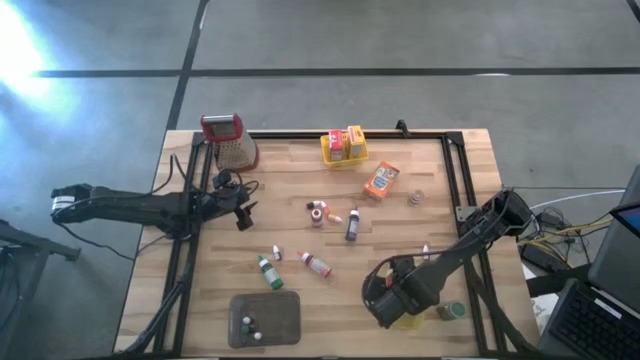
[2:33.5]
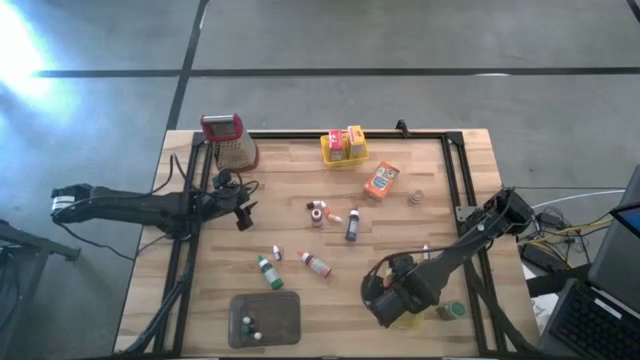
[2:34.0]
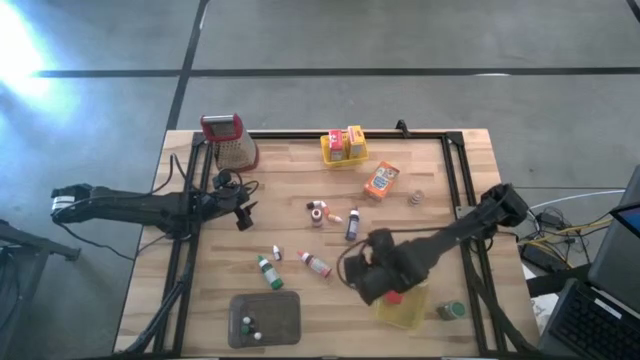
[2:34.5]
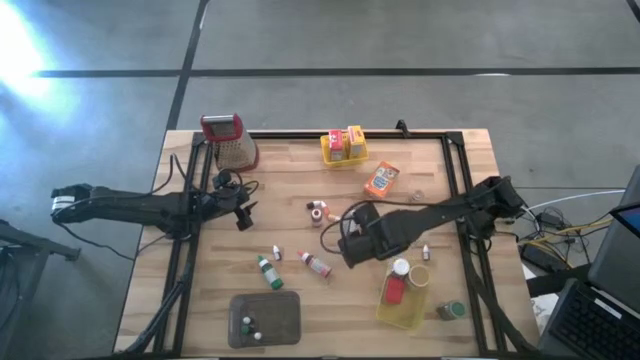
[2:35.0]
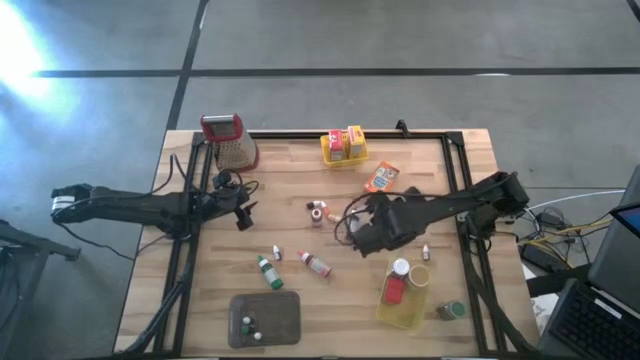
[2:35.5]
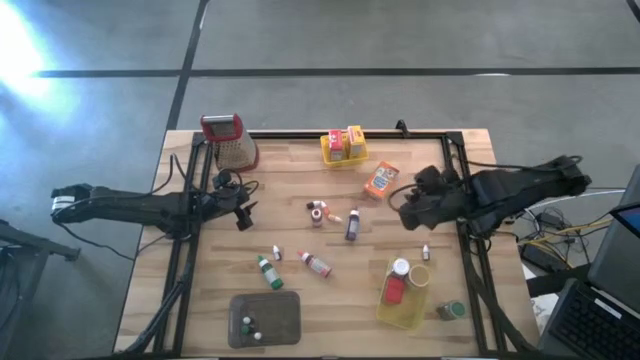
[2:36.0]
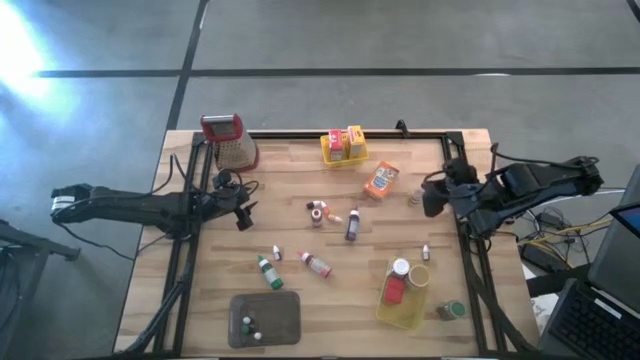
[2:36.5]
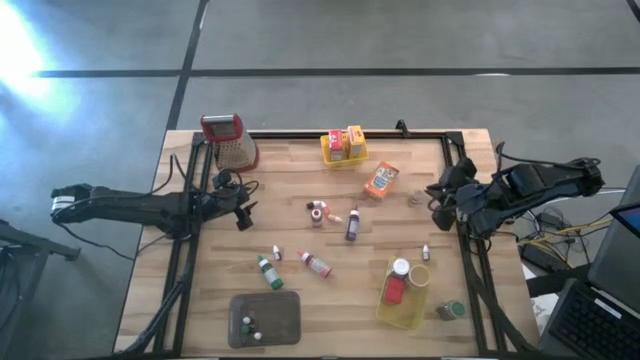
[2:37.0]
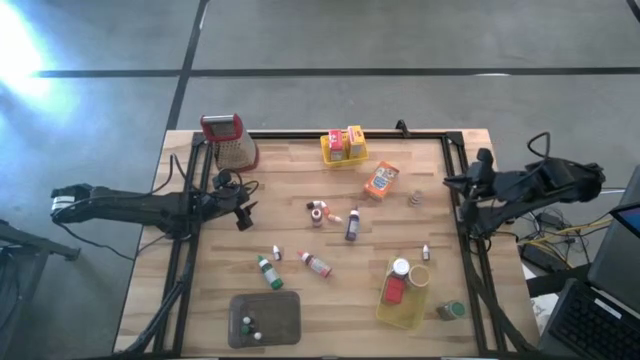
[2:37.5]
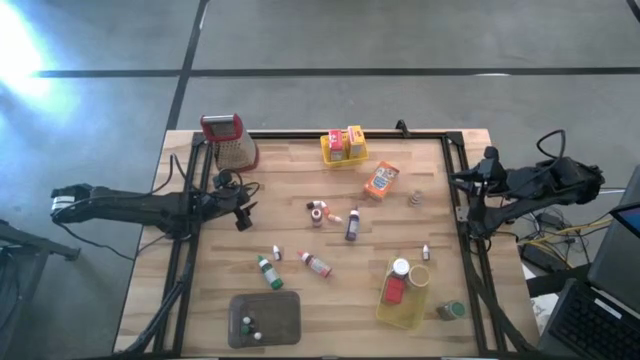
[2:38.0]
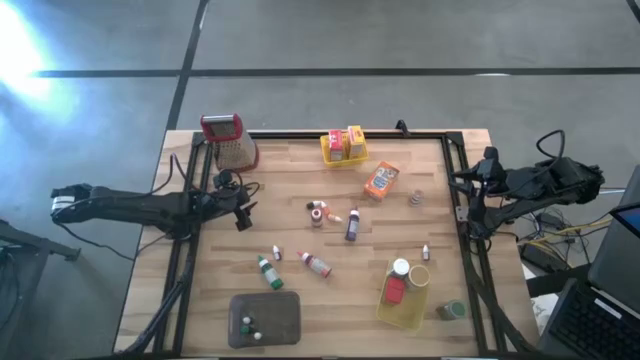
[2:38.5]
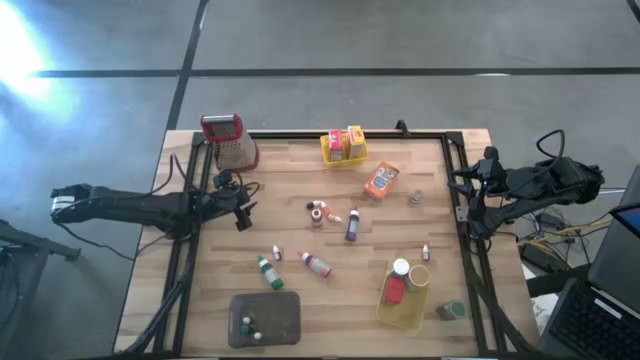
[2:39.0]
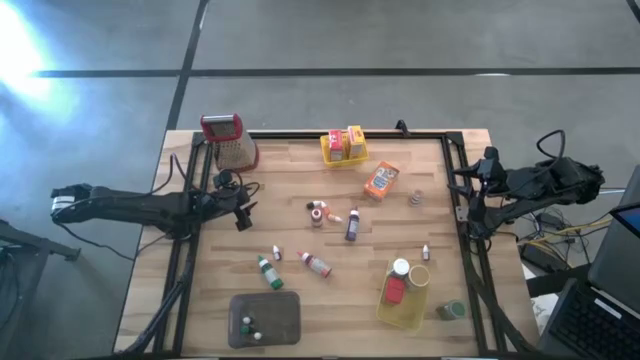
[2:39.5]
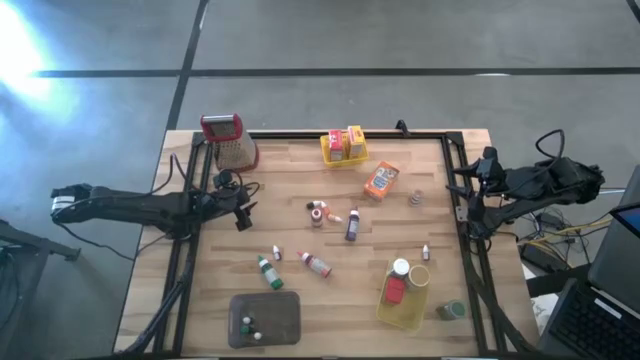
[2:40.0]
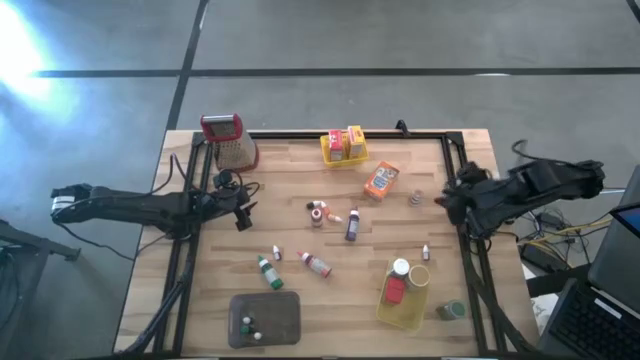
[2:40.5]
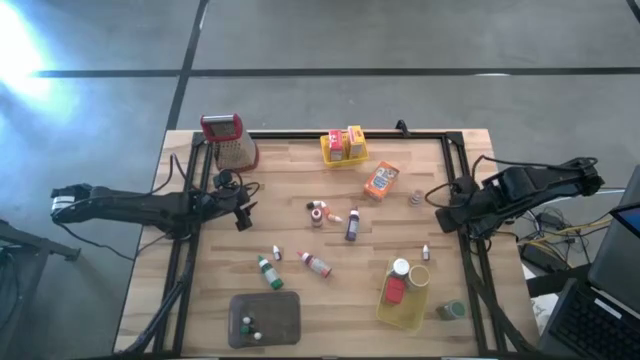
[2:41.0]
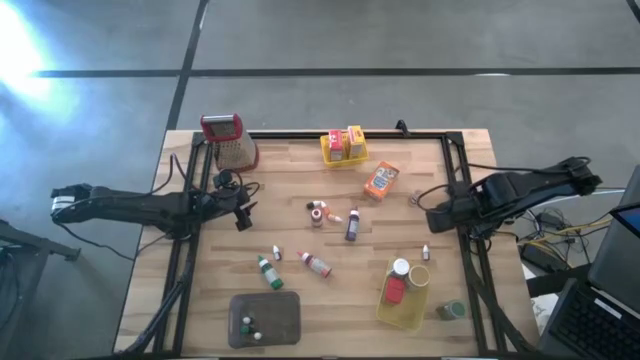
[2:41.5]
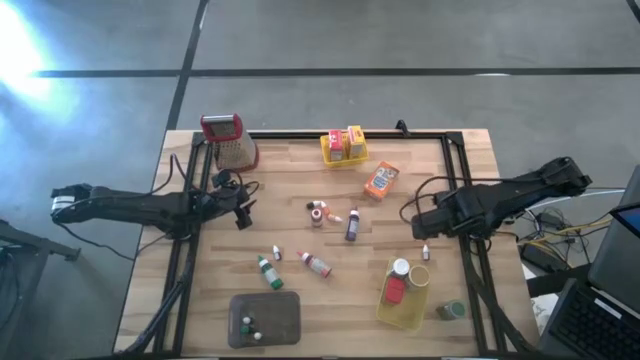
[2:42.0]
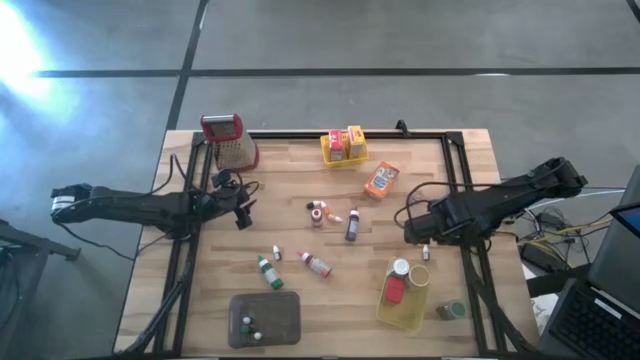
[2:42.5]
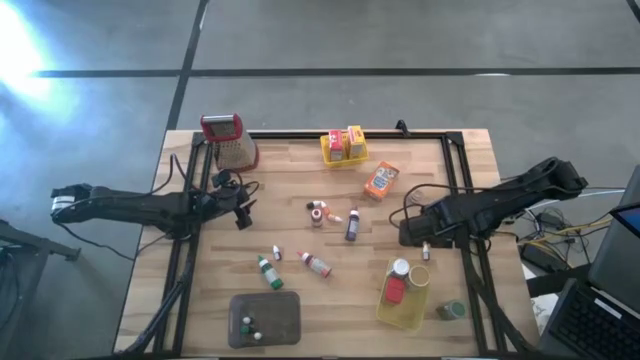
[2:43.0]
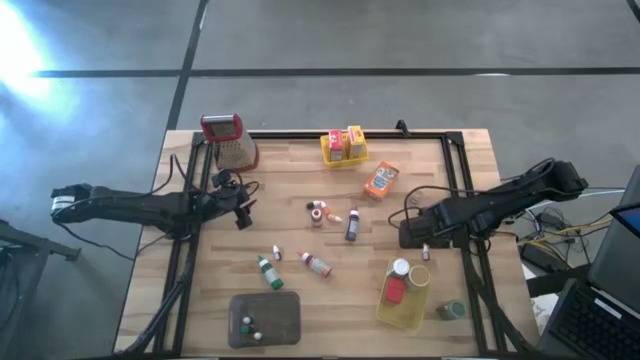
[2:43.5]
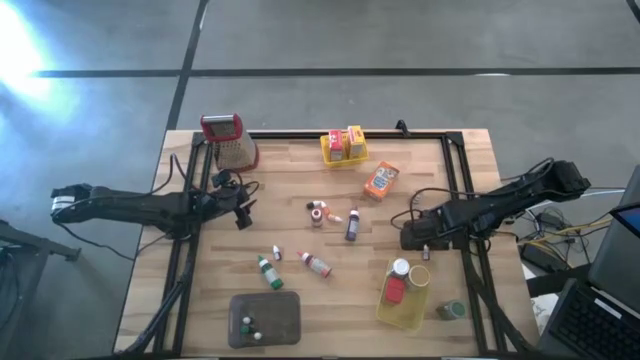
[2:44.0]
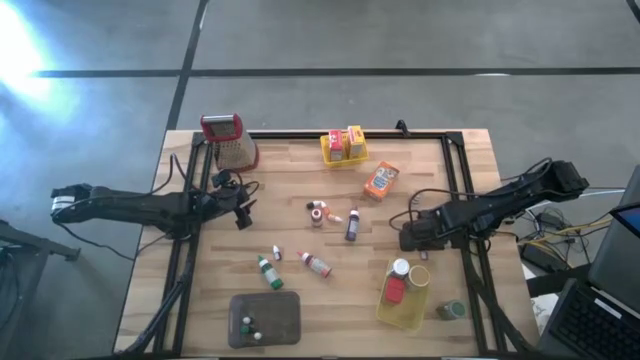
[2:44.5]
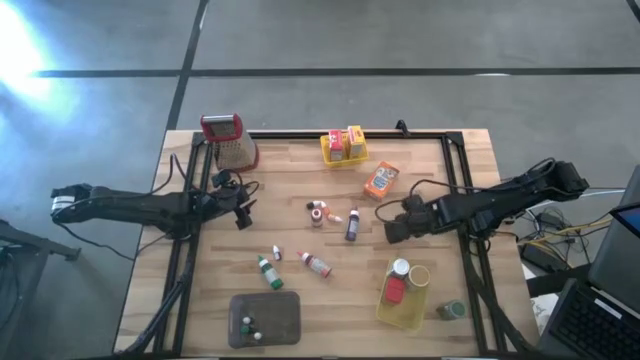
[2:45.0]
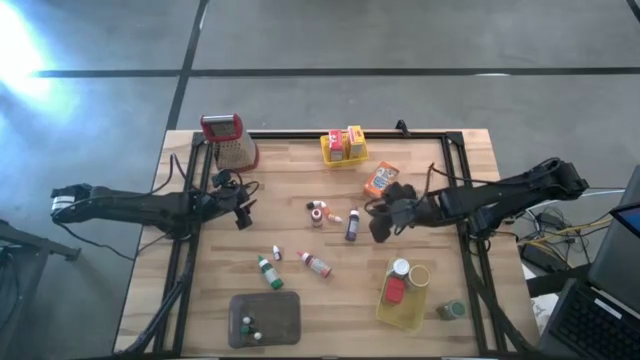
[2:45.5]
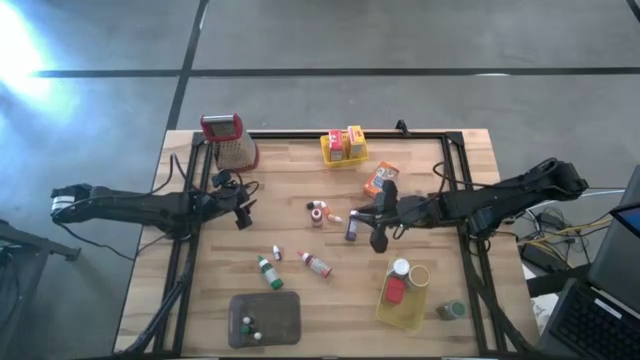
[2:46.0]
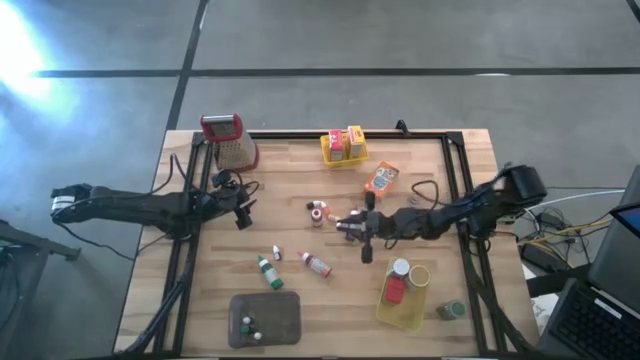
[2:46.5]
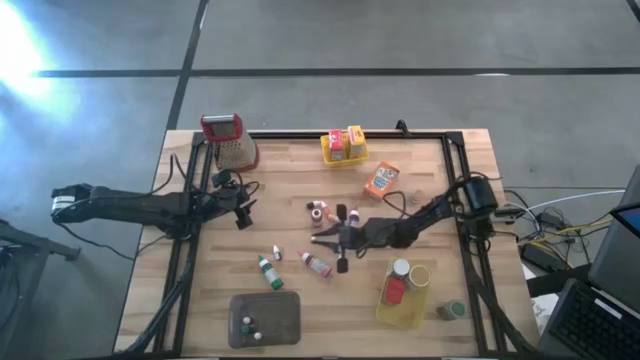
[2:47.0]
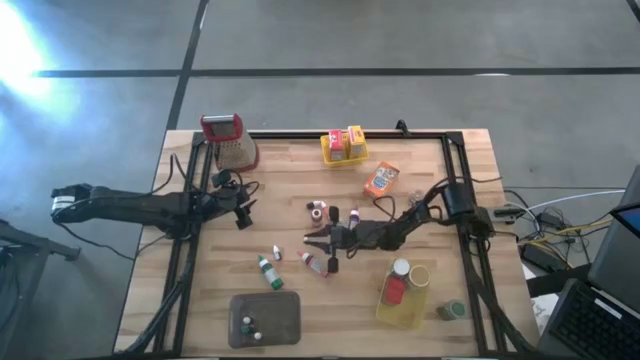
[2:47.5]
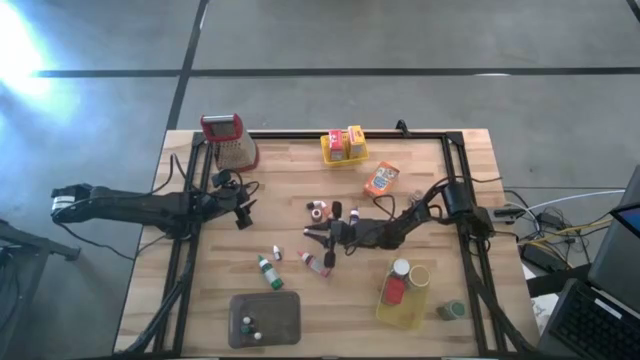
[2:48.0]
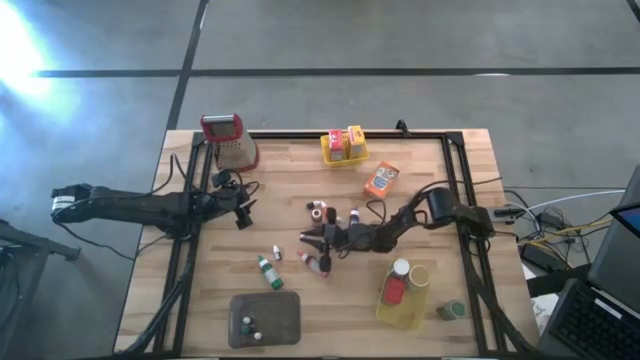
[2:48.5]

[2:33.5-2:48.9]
Task: Pick & Place Kitchen Items
Put the right small pink food coloring bottle into the black bin

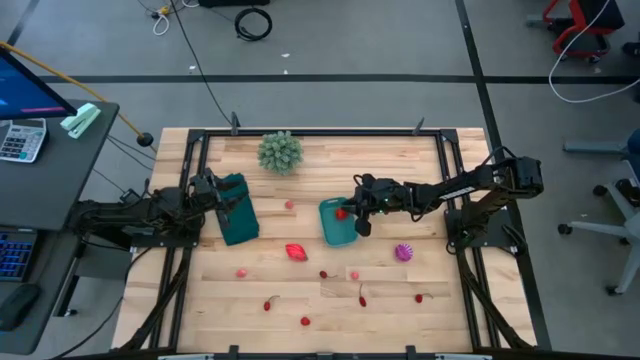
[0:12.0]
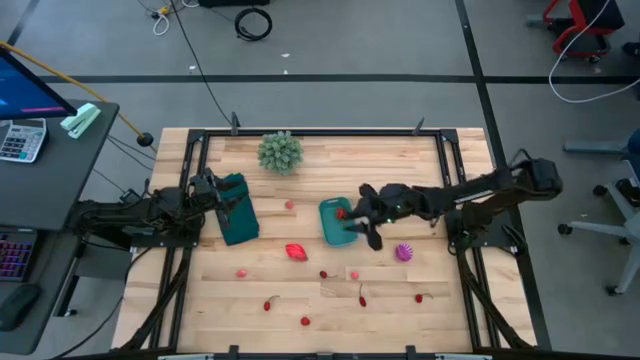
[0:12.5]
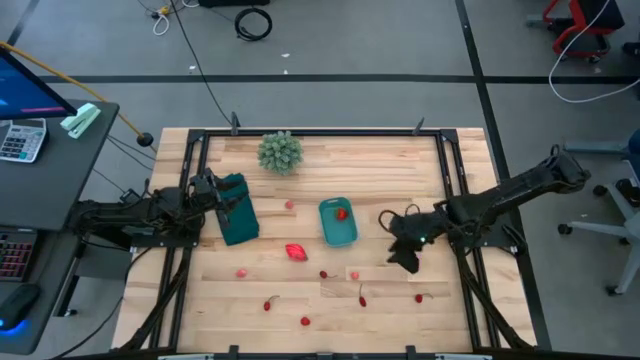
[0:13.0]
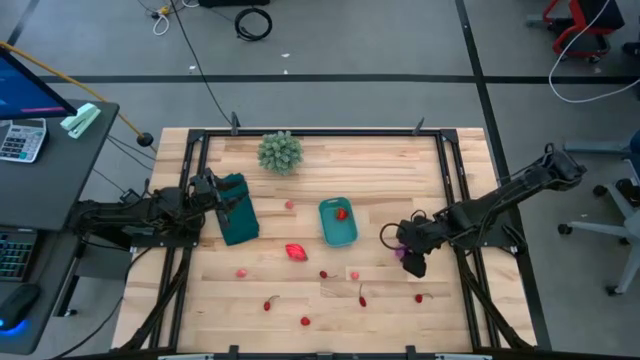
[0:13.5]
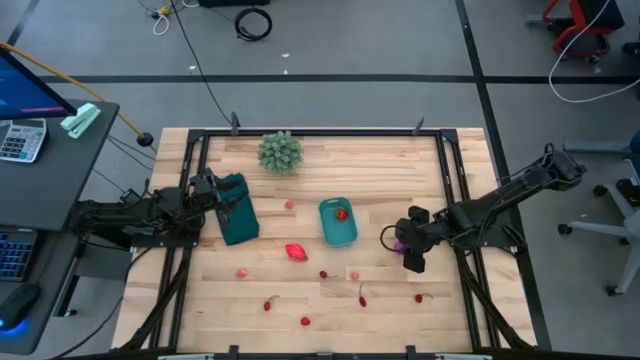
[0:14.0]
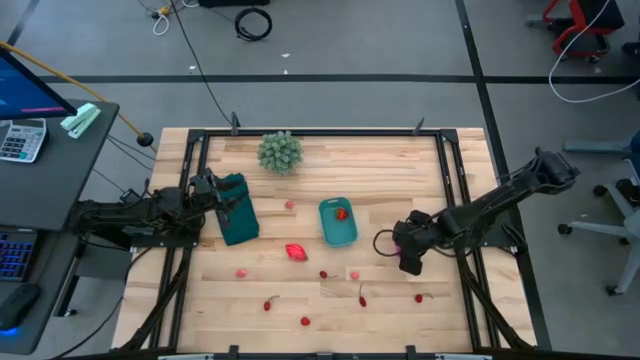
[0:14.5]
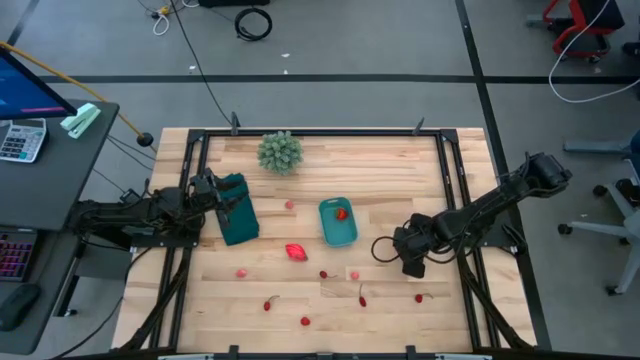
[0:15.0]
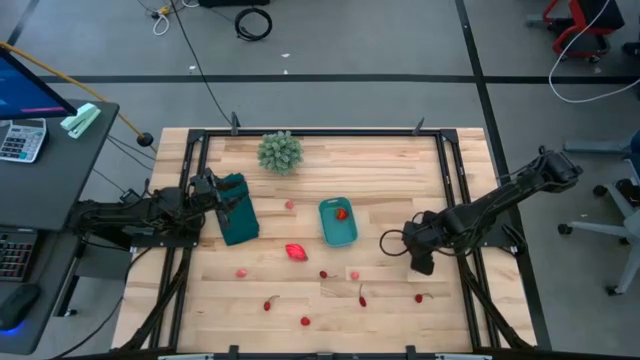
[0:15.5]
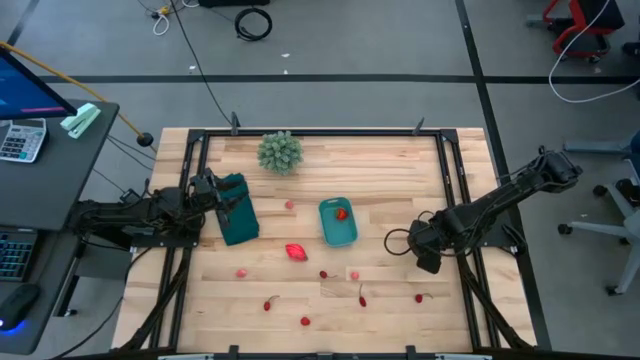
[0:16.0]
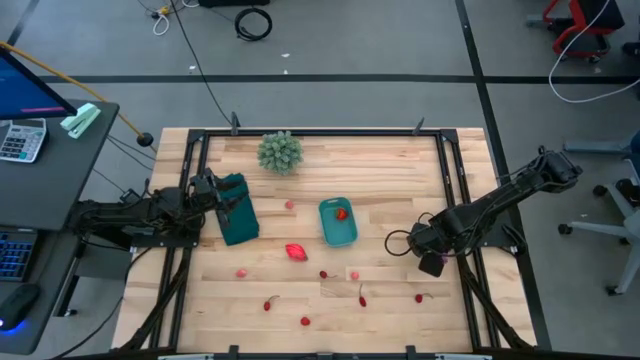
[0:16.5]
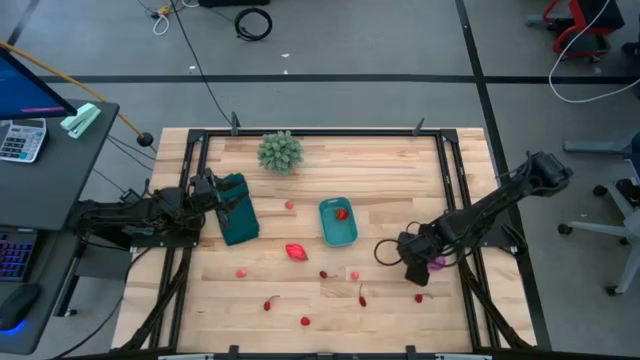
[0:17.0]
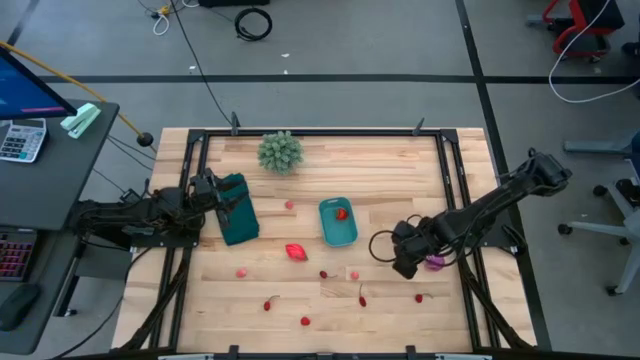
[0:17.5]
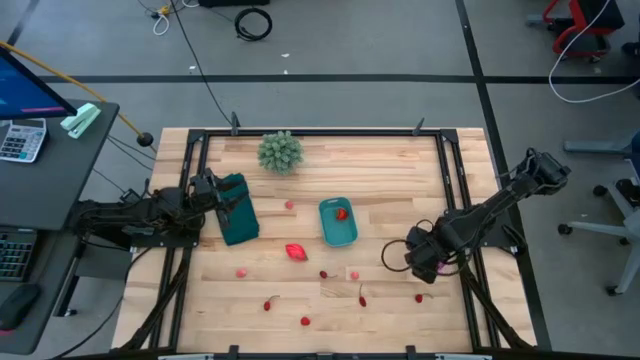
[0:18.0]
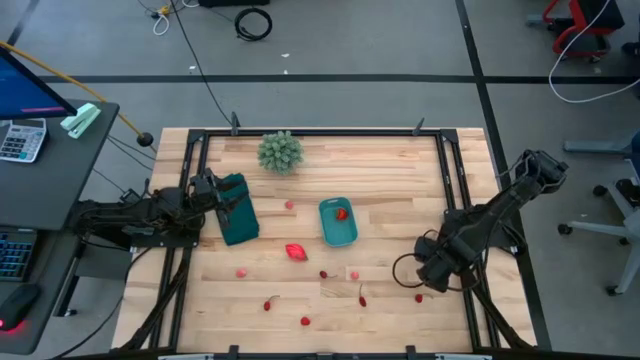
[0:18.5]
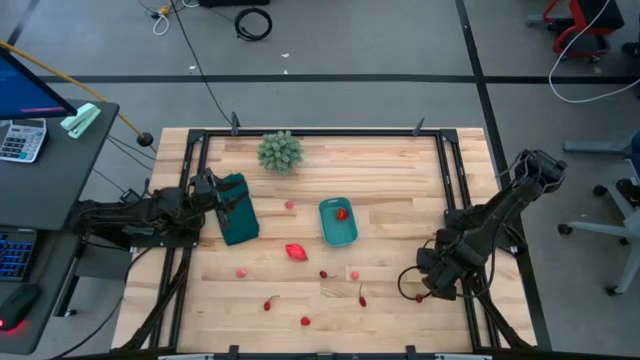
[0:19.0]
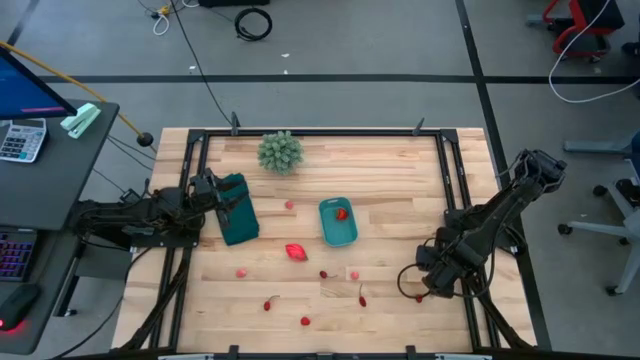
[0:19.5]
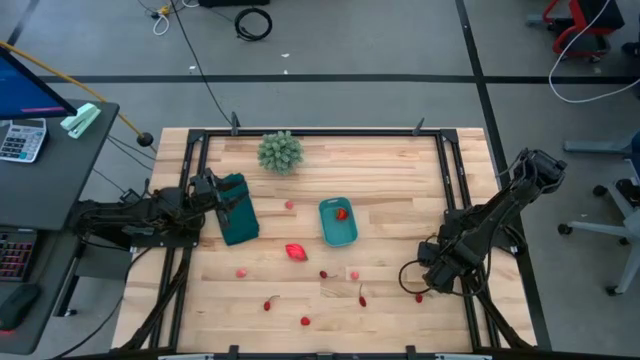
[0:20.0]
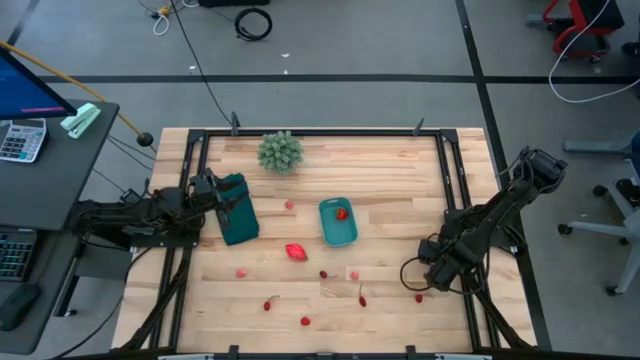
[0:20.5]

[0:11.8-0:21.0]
Task: Pick and placing Produce into tupperware
Put the purple onion into the blue bin
